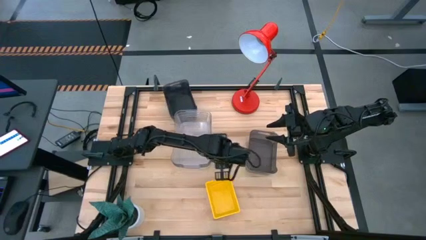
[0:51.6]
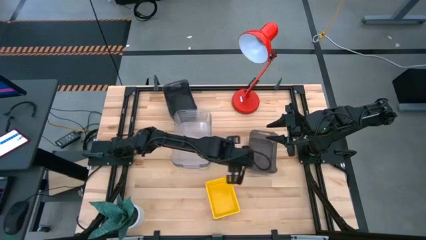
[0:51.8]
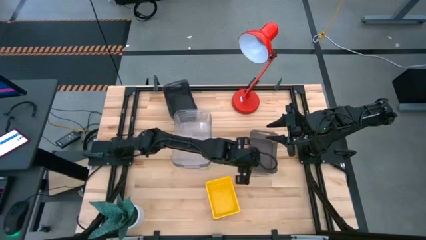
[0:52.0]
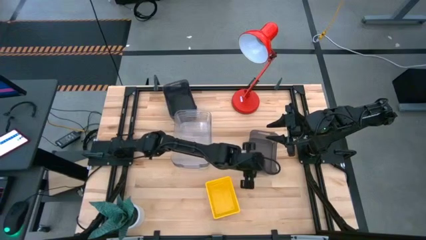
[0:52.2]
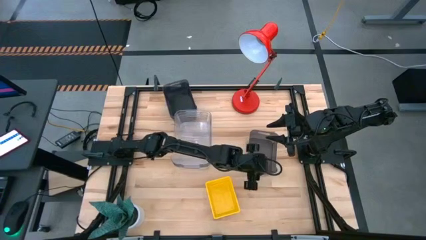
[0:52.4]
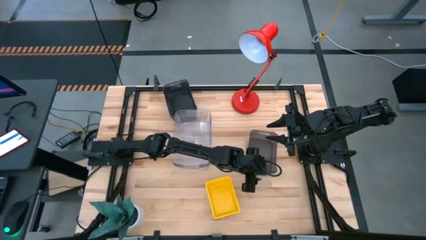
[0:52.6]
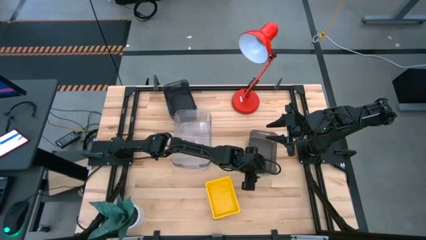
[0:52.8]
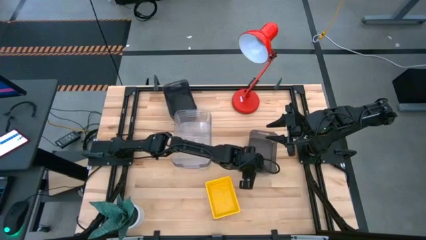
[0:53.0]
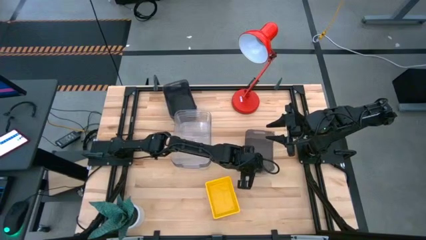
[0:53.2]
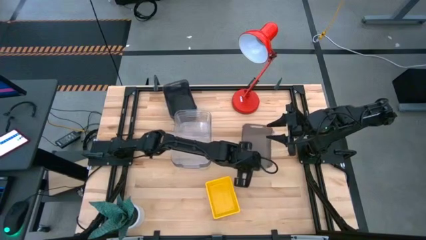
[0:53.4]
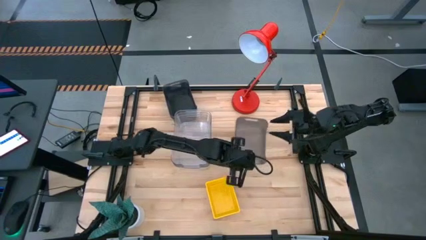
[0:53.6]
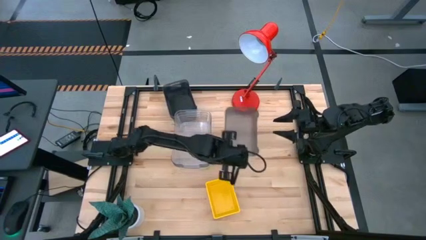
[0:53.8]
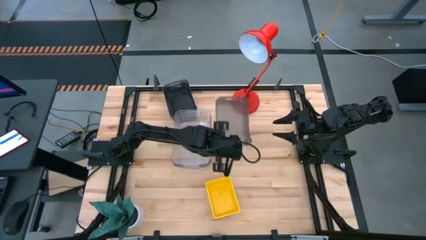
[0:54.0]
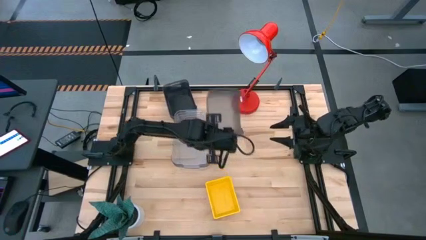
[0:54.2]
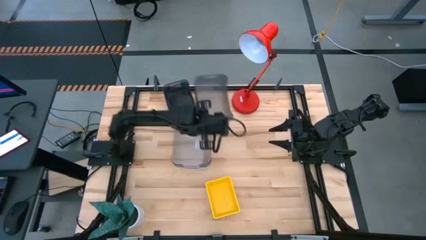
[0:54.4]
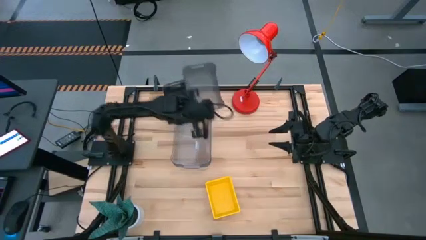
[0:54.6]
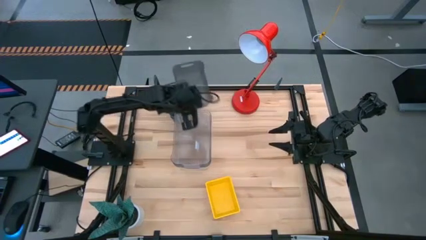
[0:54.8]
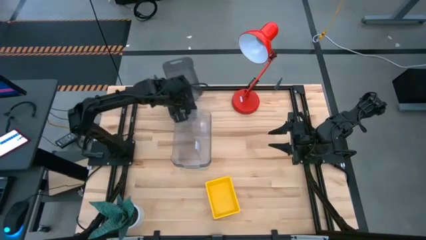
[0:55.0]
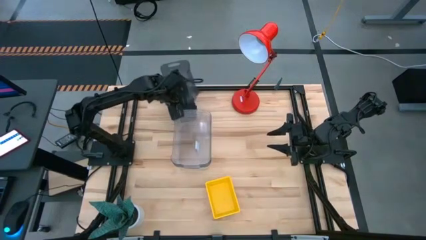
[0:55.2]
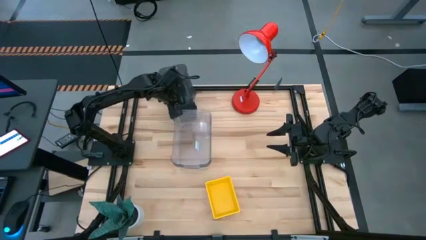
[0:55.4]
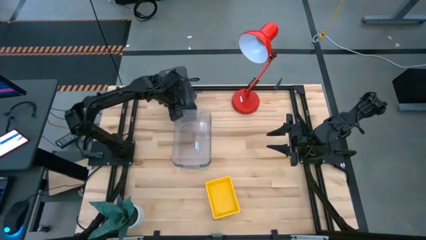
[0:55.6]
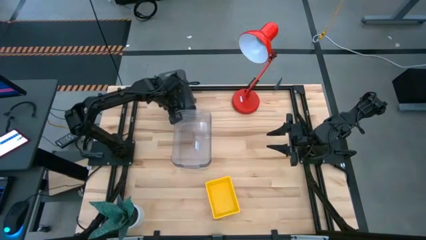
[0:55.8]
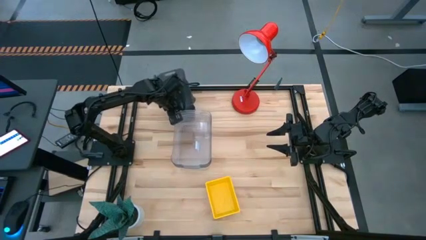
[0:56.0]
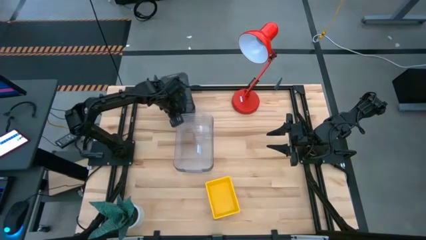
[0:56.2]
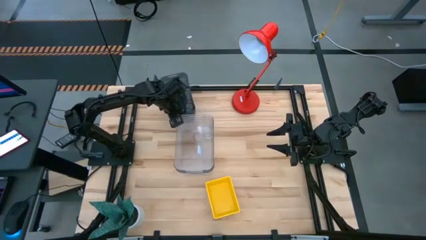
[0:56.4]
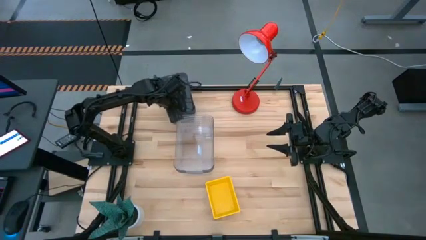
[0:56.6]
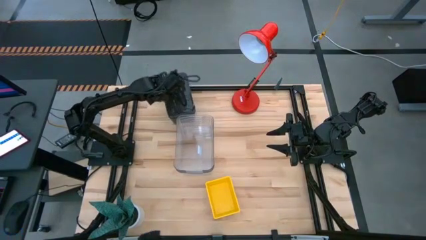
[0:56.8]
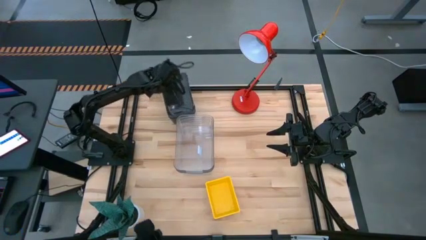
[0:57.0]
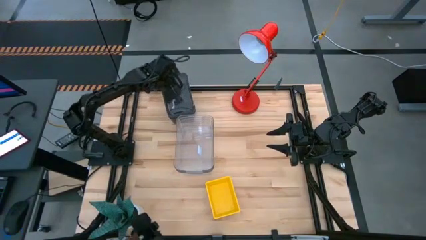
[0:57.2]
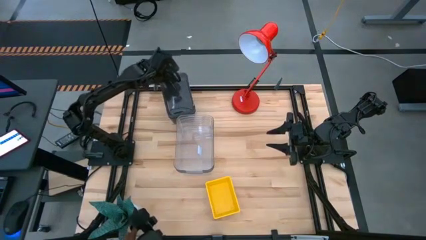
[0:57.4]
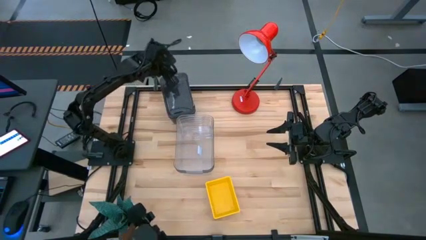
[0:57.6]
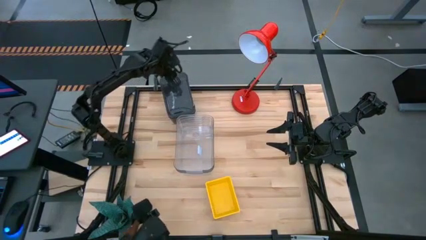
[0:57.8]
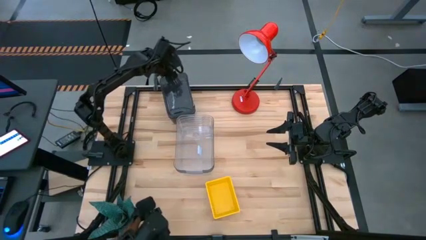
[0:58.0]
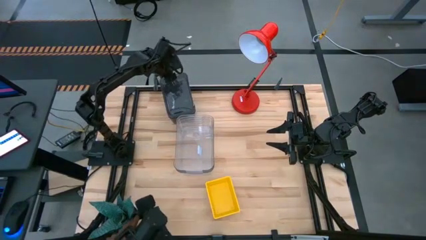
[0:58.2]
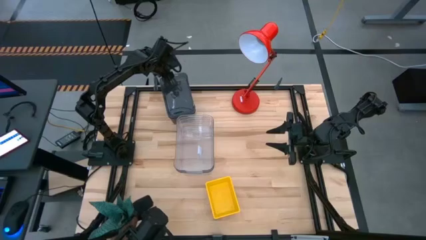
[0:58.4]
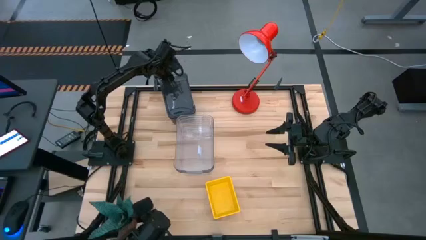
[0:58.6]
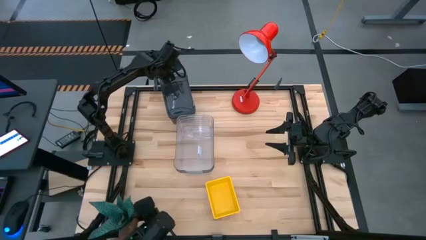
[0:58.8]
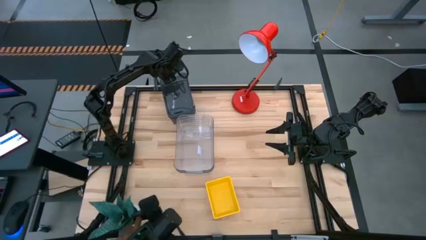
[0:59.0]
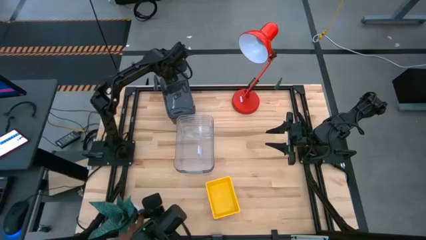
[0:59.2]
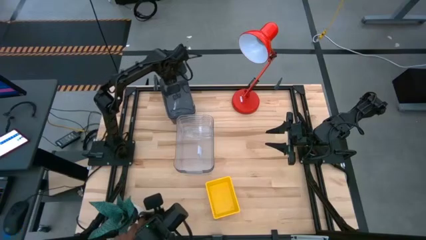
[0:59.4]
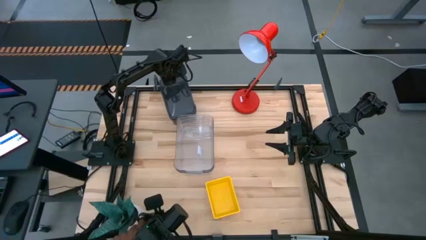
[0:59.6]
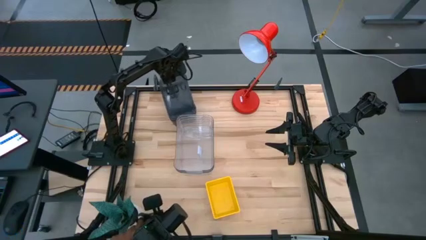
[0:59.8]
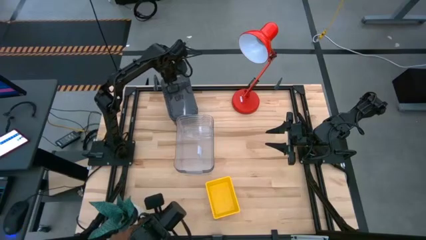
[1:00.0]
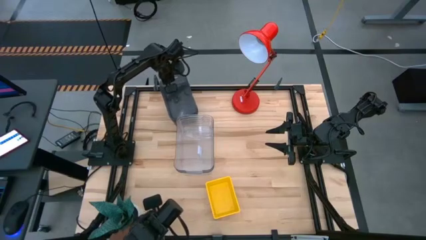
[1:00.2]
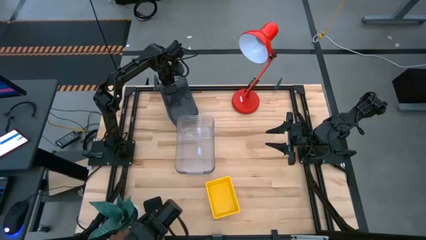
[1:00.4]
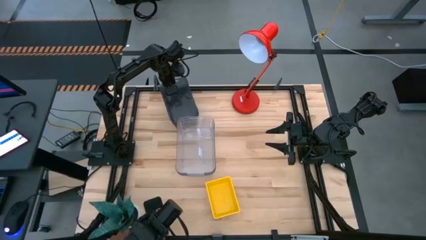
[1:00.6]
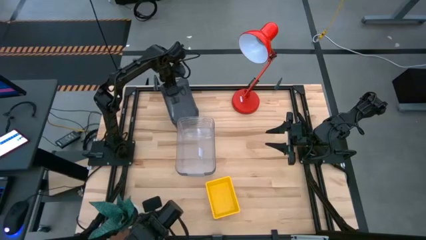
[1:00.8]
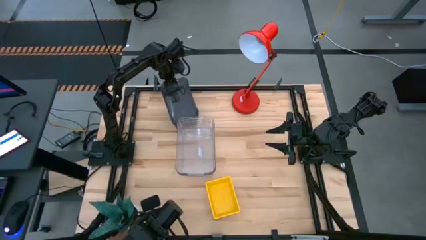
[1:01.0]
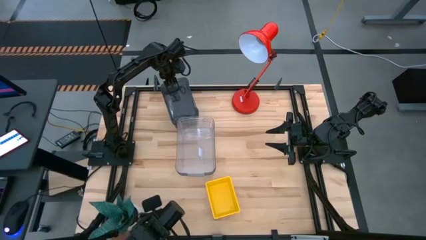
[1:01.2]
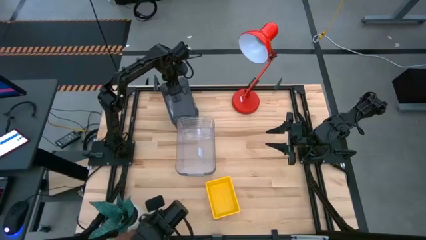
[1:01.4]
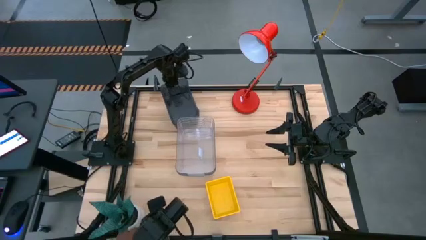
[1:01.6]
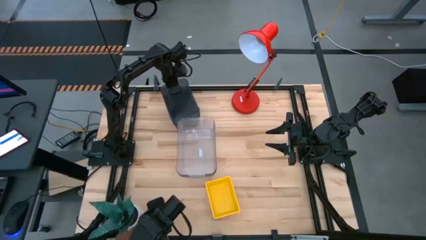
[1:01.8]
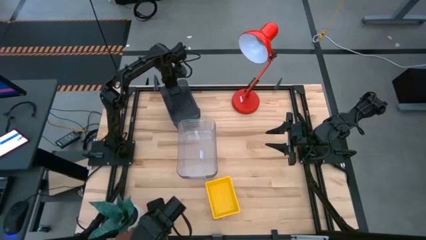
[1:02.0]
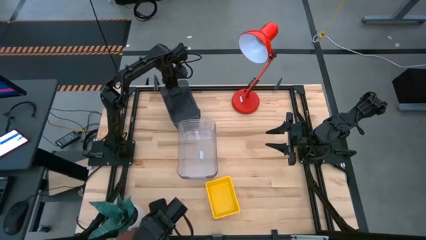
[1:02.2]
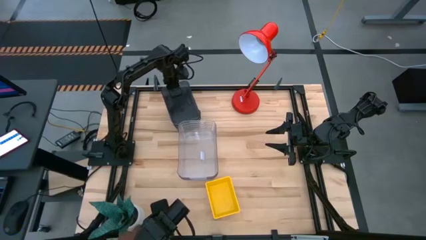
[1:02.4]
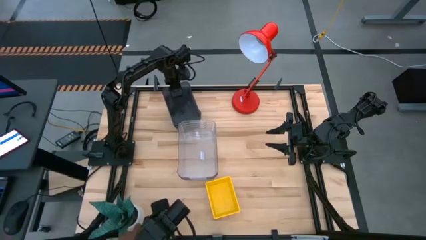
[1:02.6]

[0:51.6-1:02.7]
Stack the bottom black bin on the top black bin

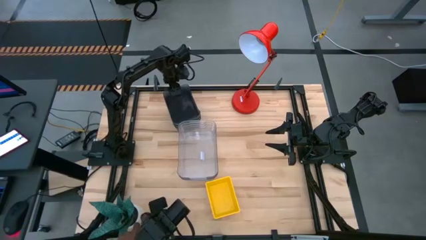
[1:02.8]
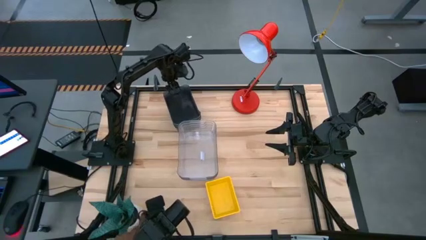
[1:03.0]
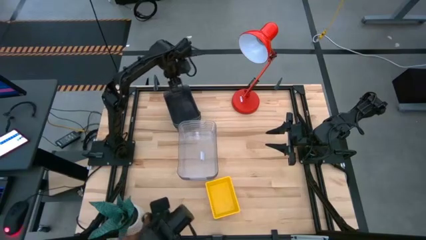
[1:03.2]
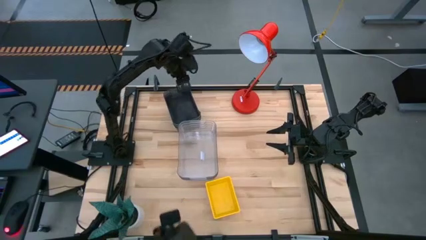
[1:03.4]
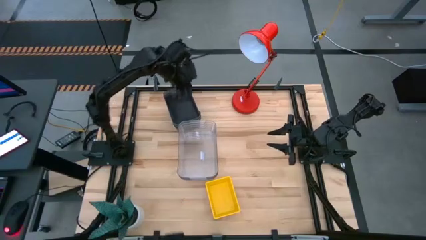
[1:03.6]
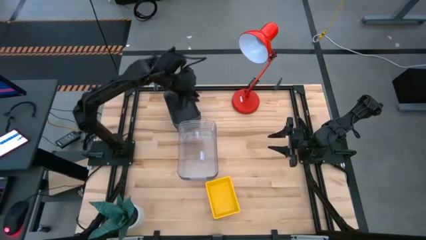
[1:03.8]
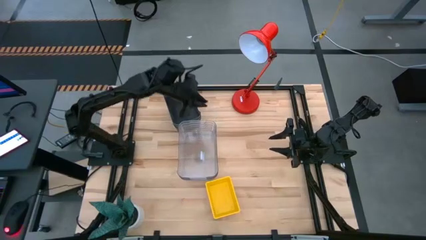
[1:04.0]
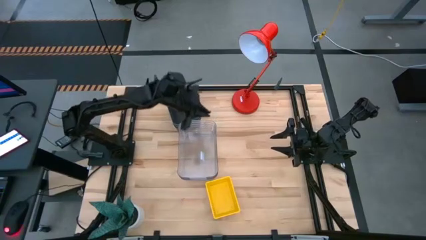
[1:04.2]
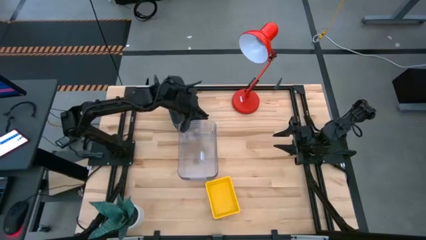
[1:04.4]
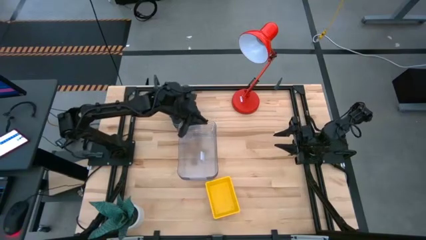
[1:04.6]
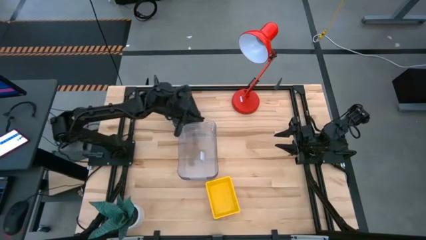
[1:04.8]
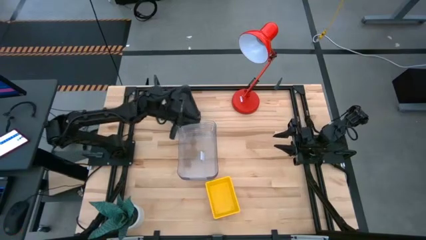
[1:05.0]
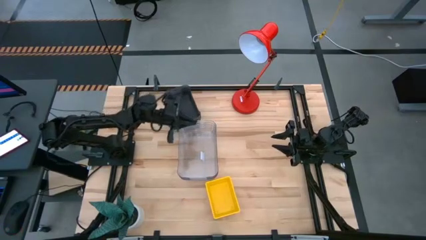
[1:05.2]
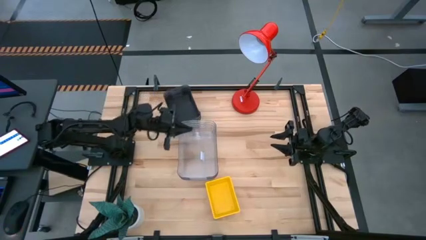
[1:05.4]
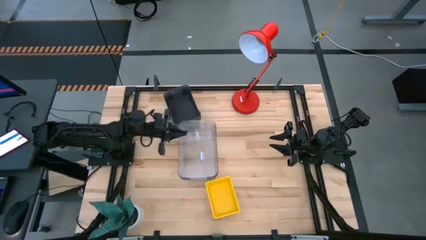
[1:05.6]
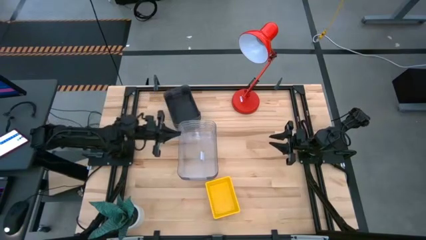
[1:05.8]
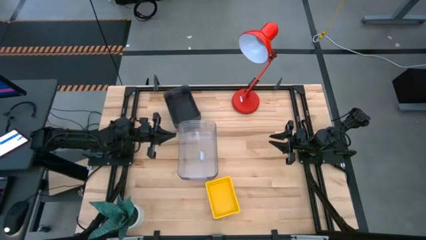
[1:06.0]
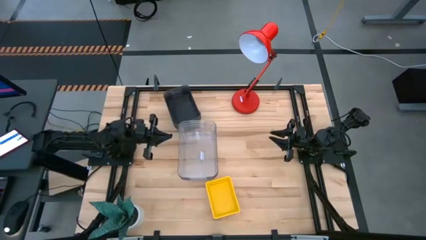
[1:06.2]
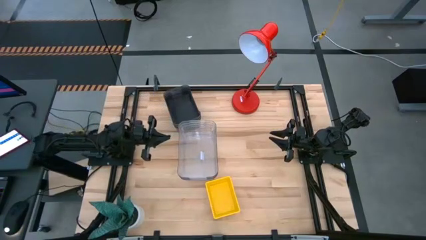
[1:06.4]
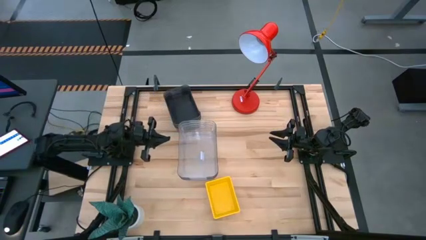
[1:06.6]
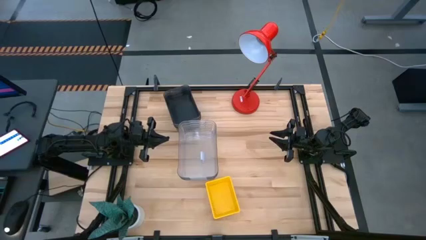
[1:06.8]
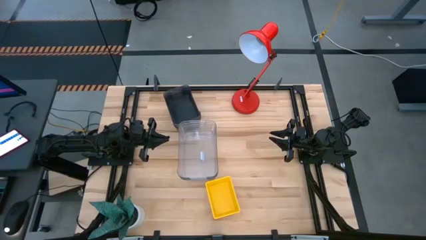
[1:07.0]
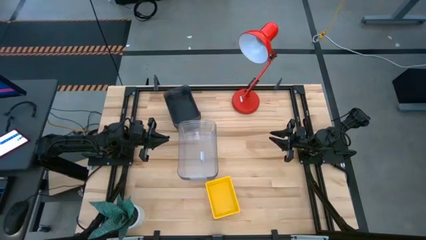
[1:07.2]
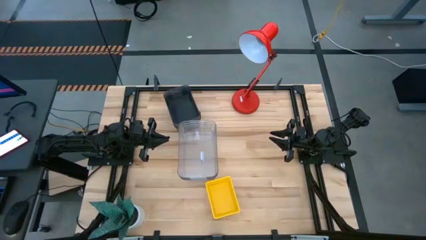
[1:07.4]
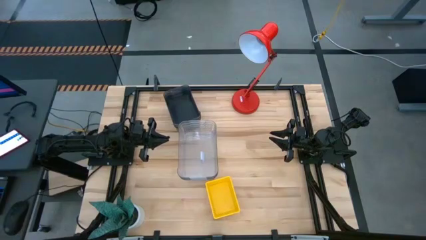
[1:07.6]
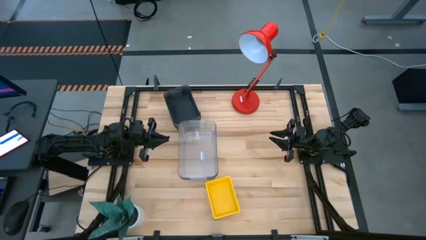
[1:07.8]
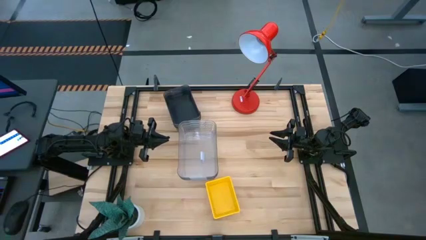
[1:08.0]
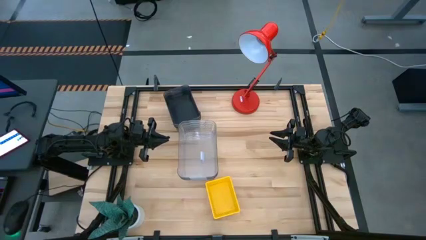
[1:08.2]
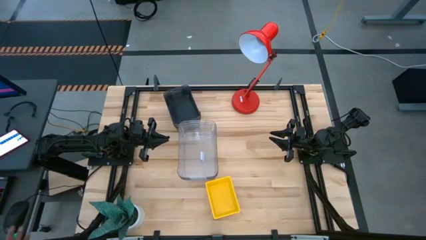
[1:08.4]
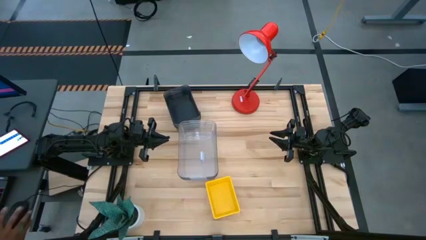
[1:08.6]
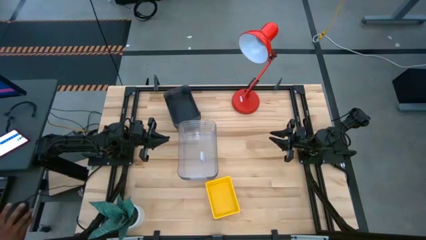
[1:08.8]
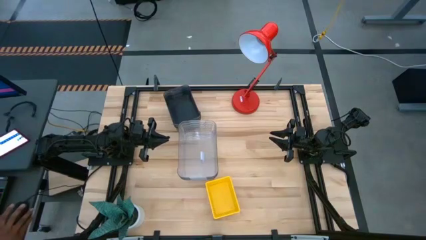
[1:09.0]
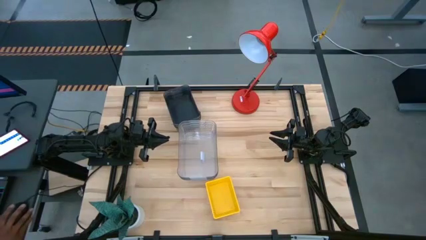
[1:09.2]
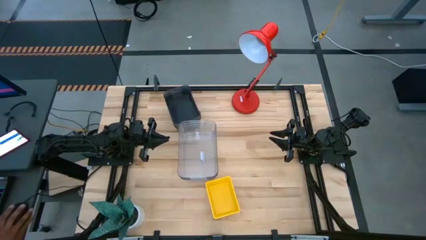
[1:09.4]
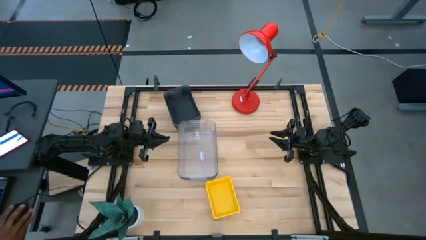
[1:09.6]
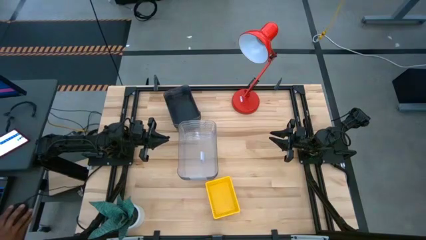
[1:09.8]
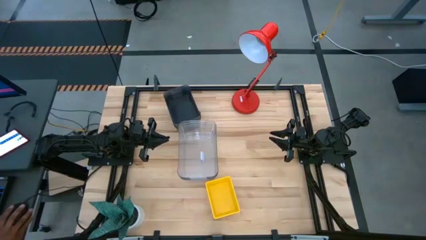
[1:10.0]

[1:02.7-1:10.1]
Return to Home Position
